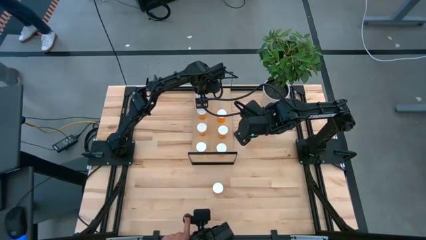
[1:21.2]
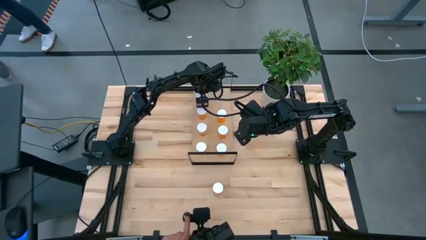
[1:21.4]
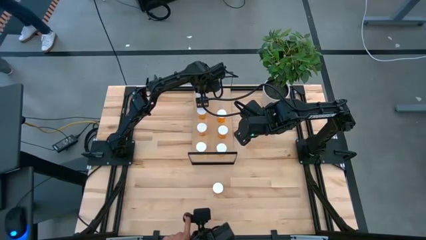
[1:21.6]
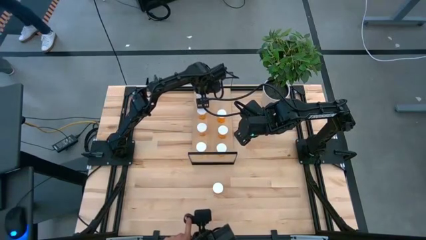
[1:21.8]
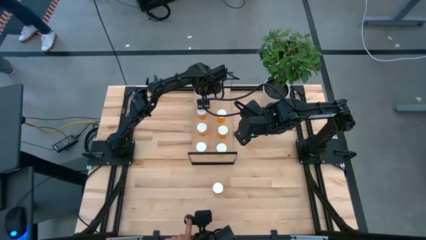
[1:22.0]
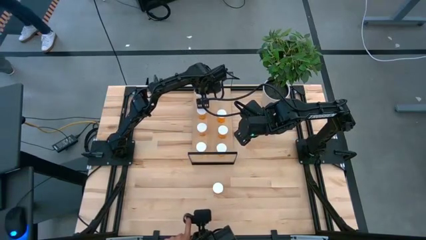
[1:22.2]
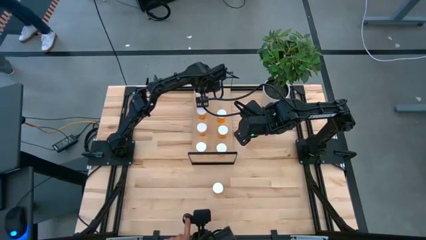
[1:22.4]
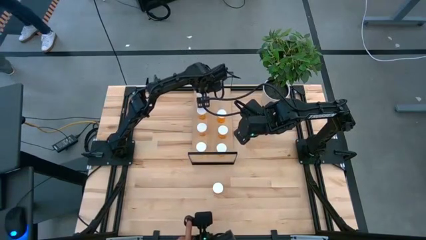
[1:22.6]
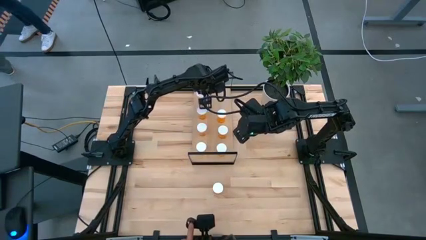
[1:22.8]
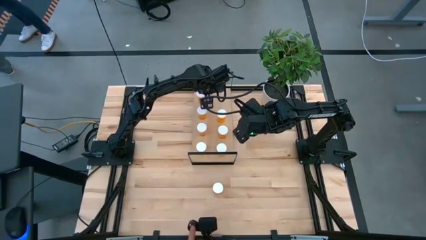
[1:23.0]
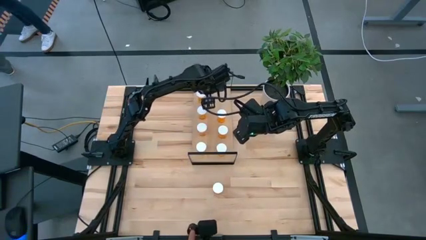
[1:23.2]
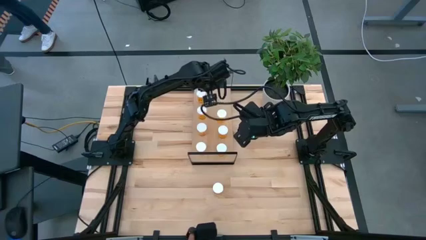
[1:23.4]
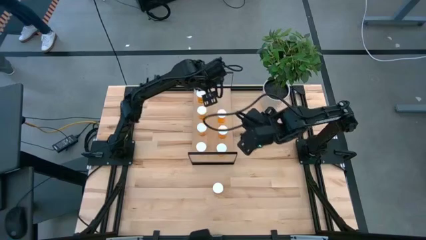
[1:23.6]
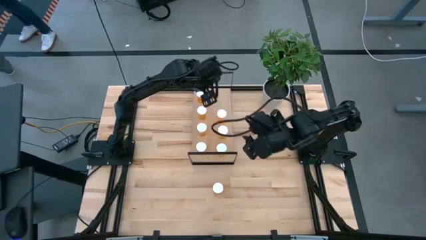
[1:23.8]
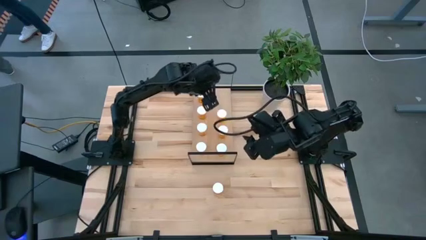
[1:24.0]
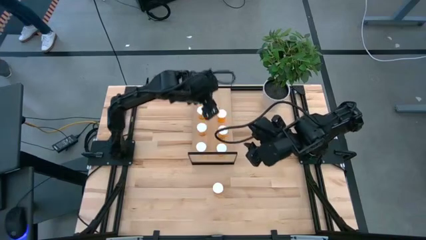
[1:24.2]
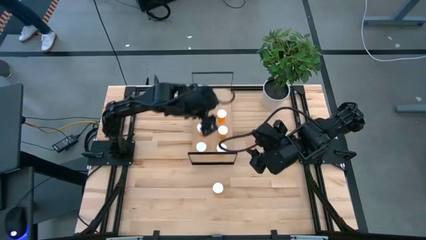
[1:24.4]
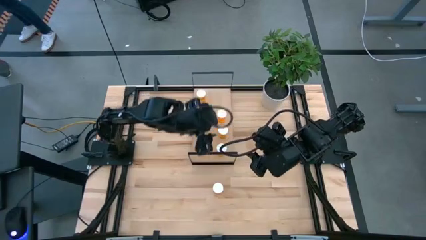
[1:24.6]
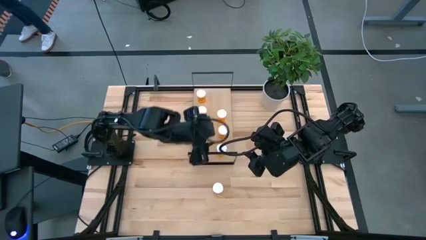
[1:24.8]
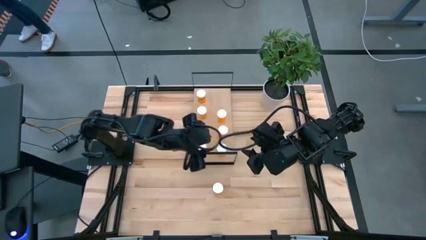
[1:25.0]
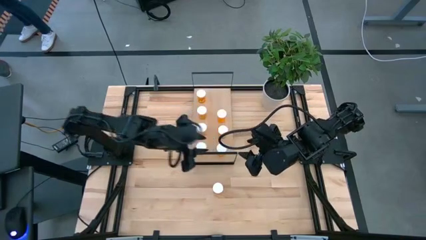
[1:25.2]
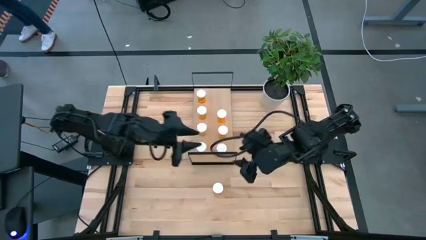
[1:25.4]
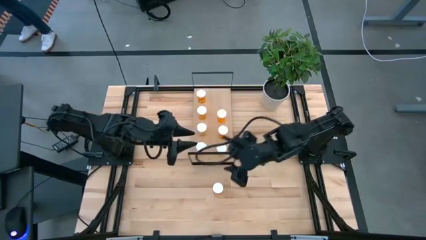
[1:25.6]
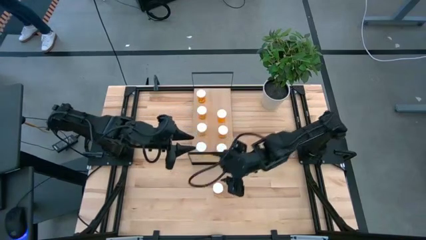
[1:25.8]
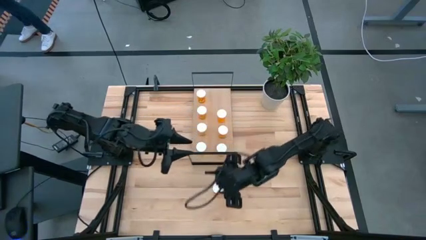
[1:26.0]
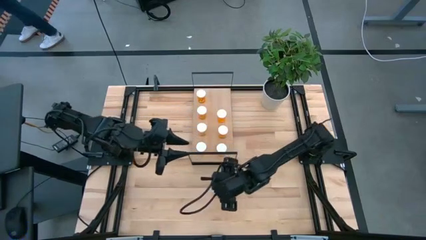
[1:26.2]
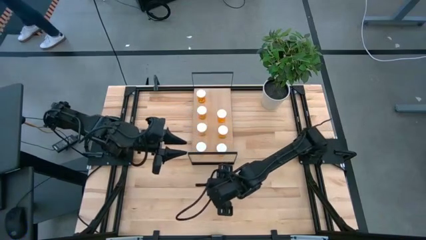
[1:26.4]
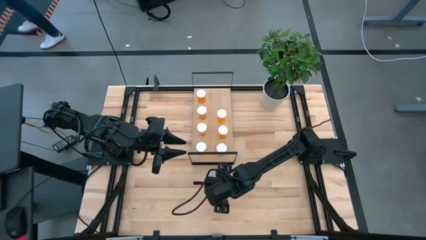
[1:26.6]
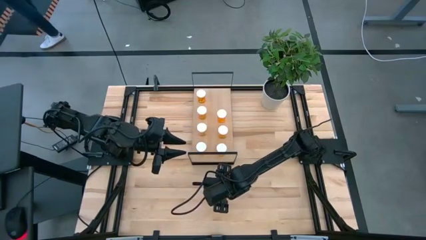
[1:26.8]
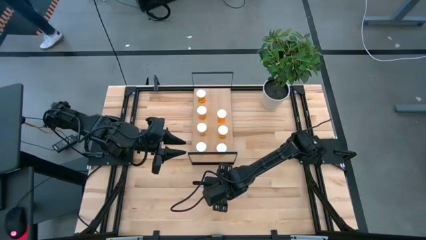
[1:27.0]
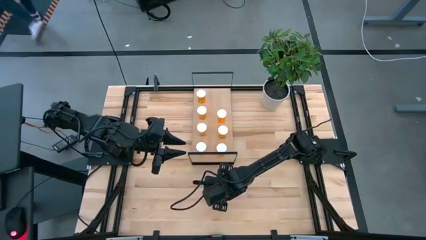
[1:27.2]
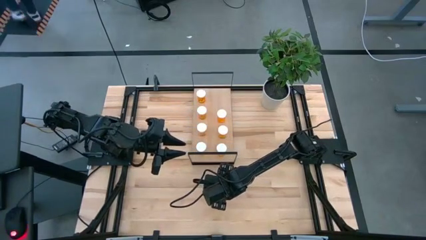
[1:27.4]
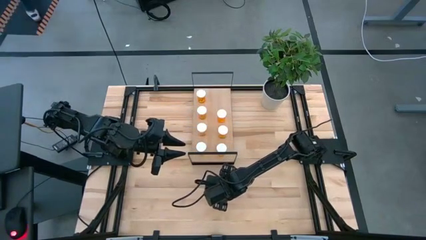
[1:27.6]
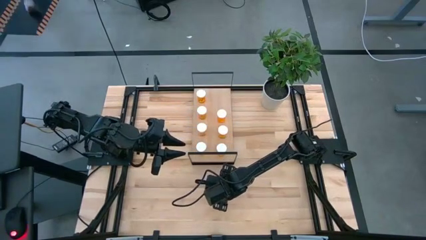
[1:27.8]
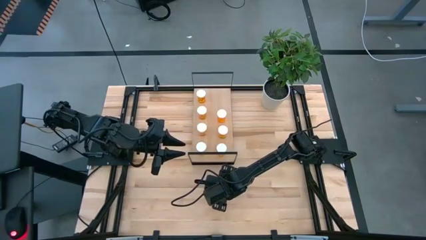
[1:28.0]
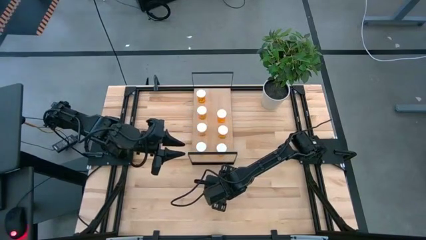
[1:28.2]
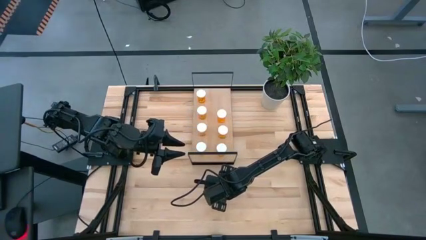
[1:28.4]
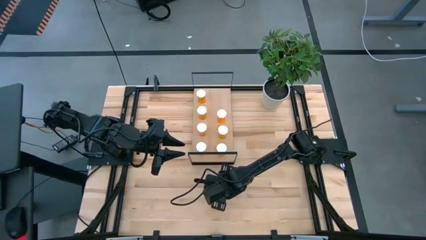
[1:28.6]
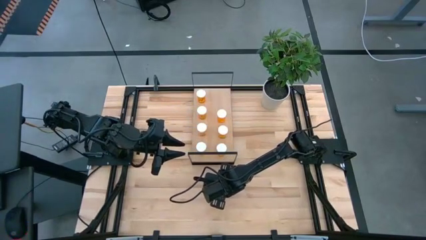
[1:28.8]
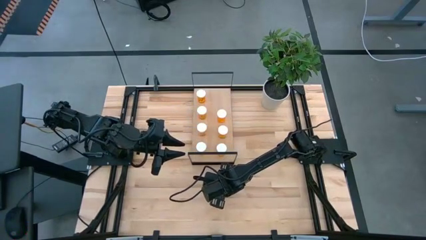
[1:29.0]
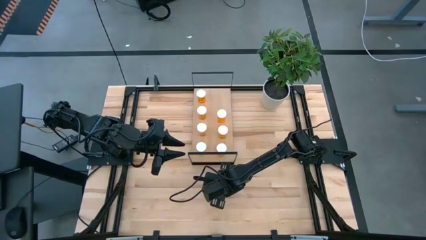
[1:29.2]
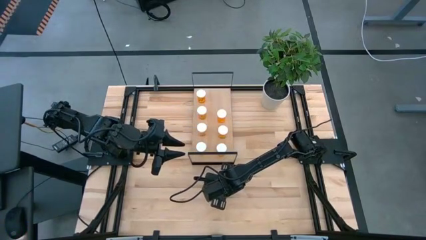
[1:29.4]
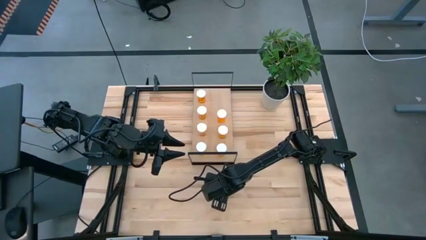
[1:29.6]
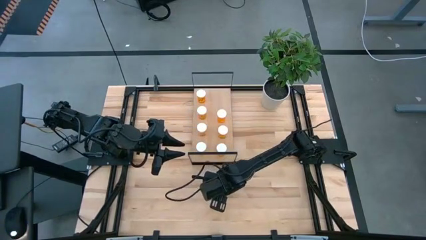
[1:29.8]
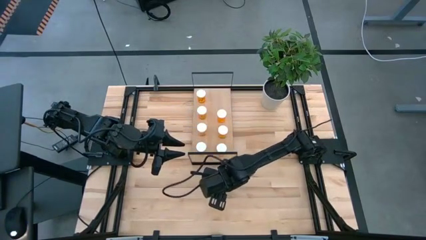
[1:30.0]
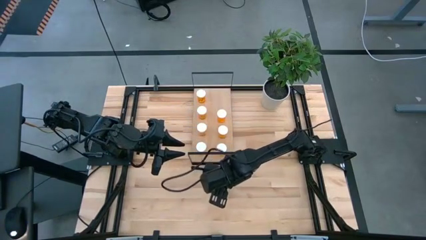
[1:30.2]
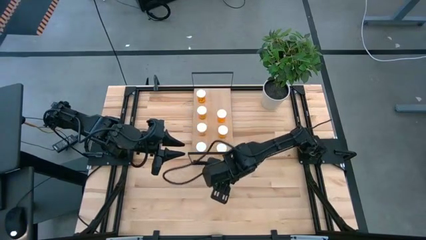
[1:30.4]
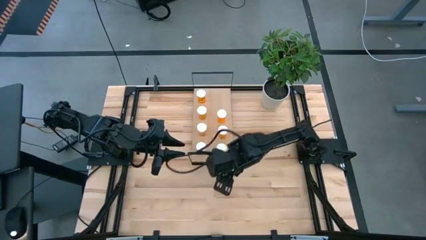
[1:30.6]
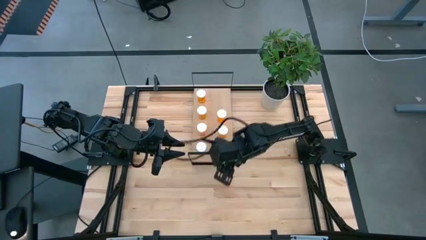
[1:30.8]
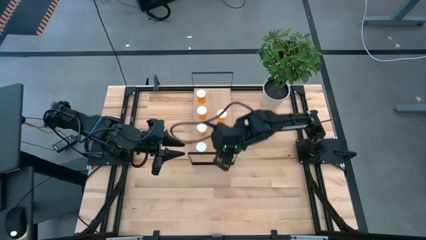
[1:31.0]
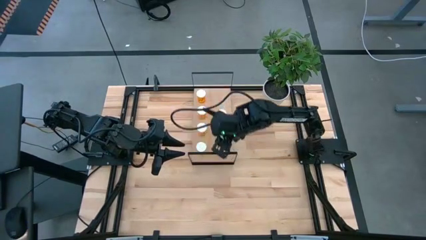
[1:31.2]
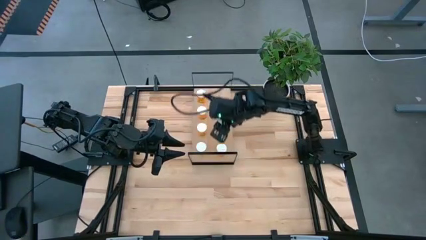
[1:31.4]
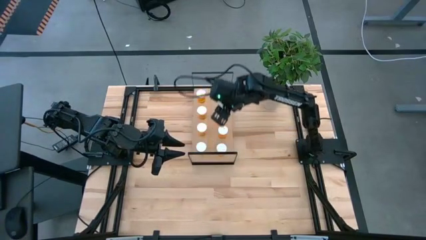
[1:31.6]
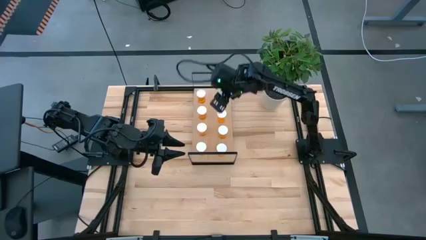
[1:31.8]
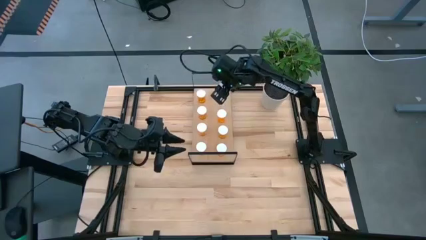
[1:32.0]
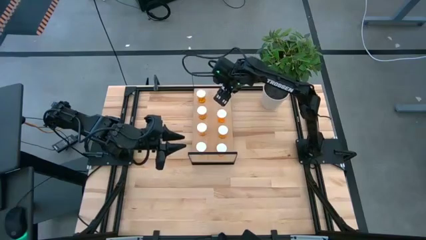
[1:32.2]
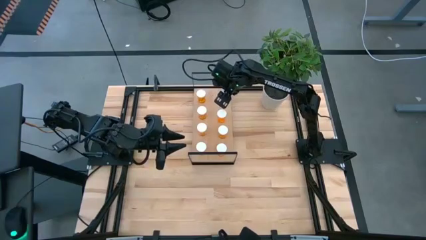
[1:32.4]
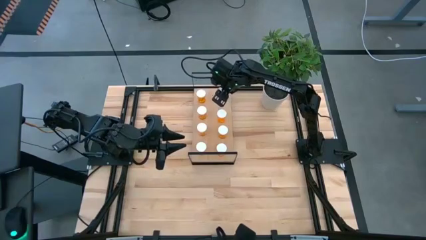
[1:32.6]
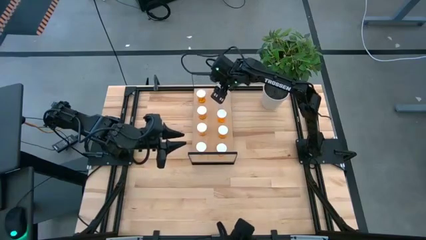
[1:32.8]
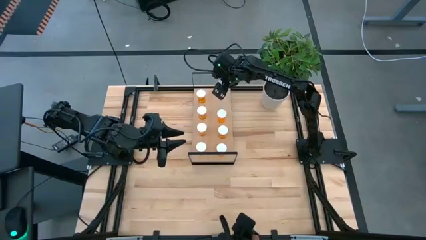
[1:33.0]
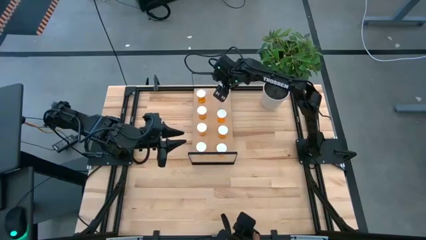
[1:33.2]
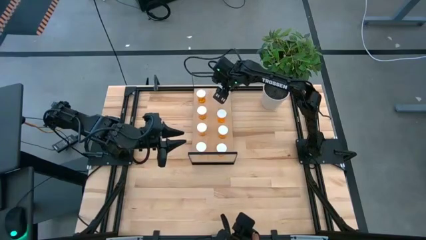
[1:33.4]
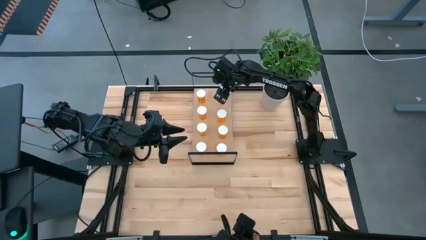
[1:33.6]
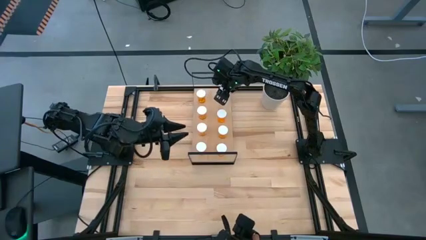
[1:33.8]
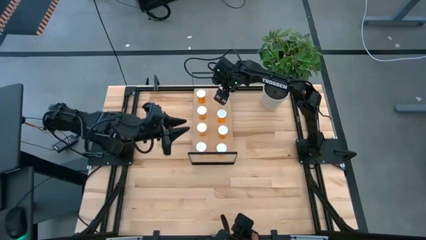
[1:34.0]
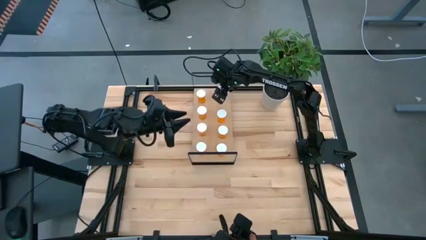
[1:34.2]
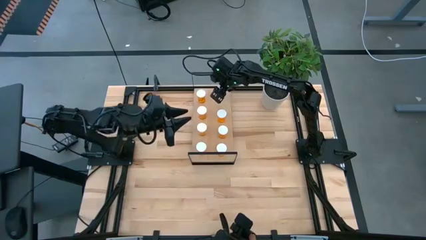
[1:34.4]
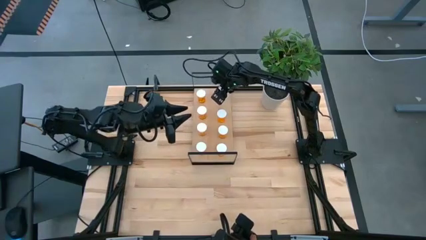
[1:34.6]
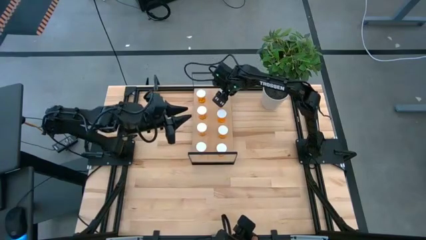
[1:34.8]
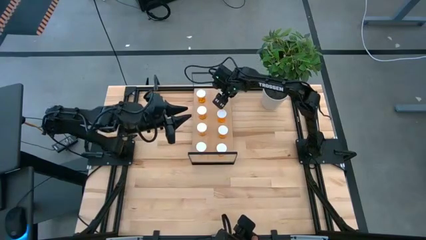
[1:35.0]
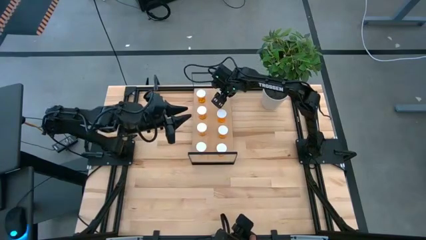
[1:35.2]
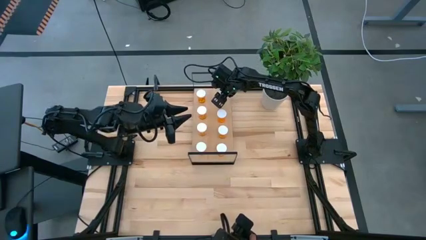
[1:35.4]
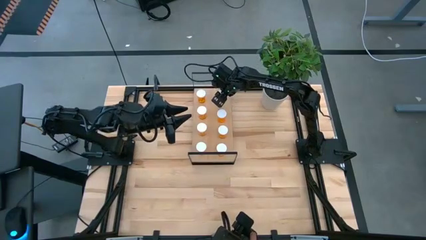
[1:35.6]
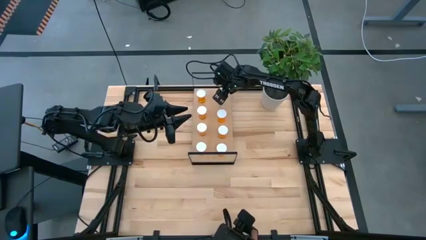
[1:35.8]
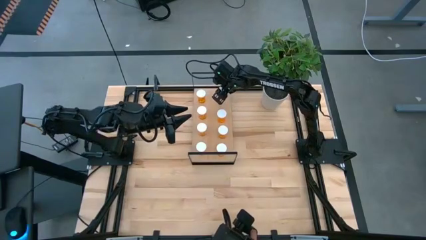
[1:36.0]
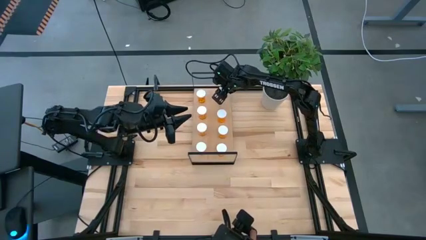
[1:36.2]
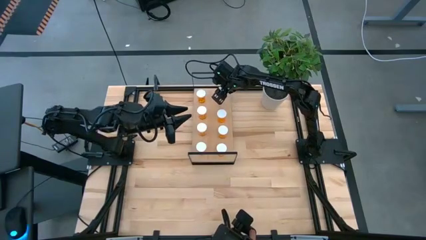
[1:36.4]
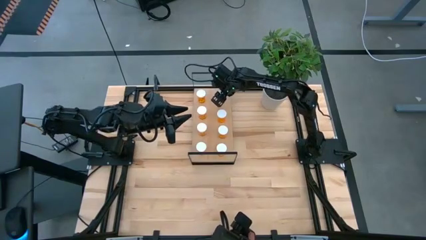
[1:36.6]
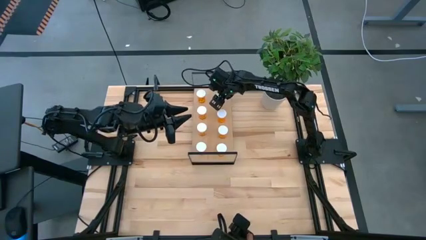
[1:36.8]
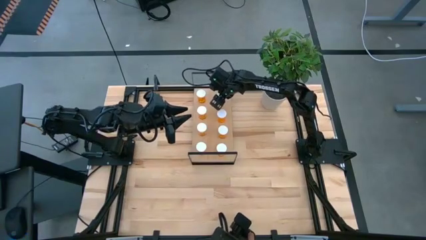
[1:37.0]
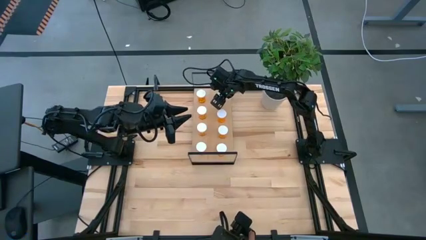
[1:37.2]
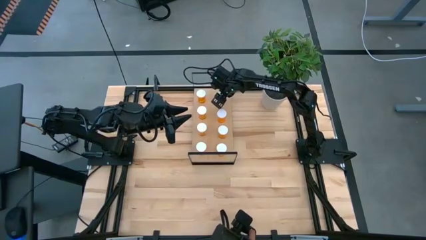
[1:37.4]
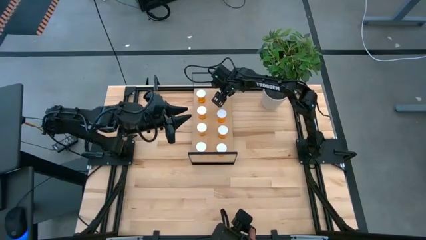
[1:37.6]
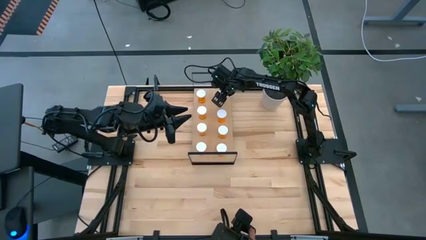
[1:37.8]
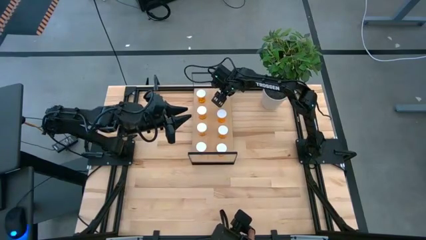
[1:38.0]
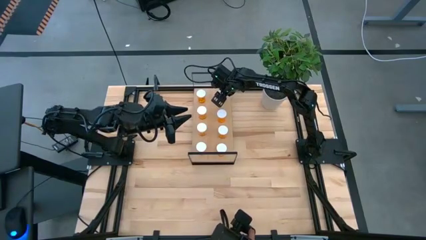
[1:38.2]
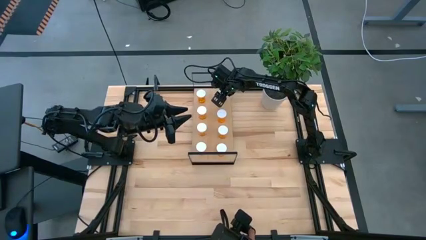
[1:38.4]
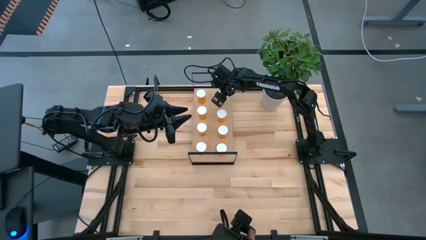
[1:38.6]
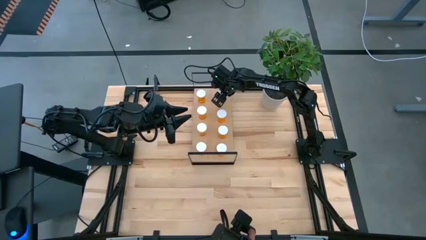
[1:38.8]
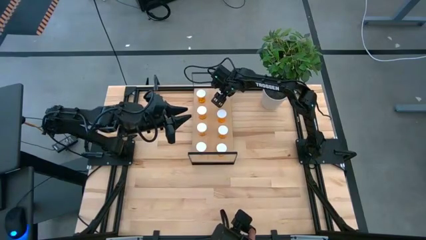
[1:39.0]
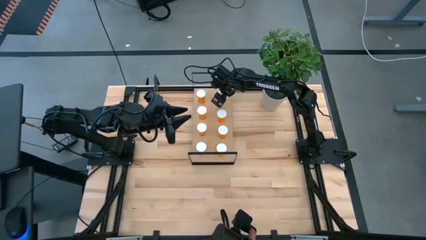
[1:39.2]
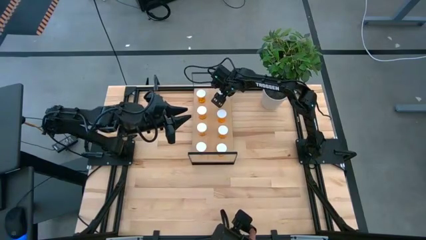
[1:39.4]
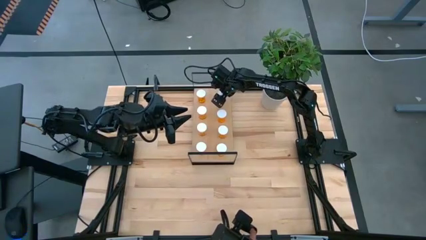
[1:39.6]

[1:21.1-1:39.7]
Task: Pick and place medicine bottles onto shelf by color
Put the orange pill bottle on the shelf aligned with the other orange pill bottles
